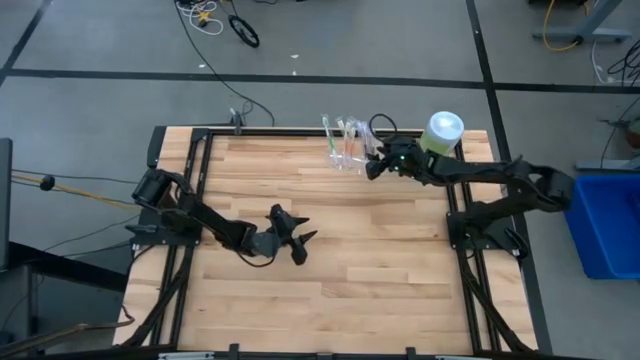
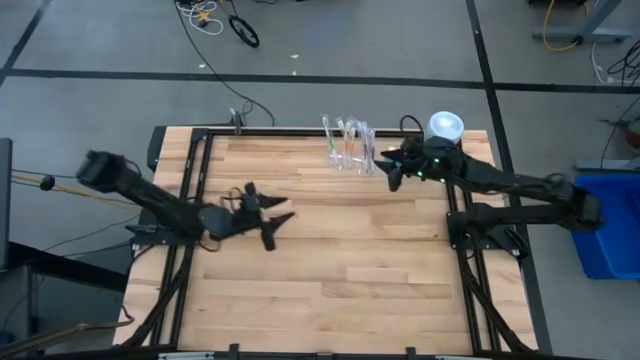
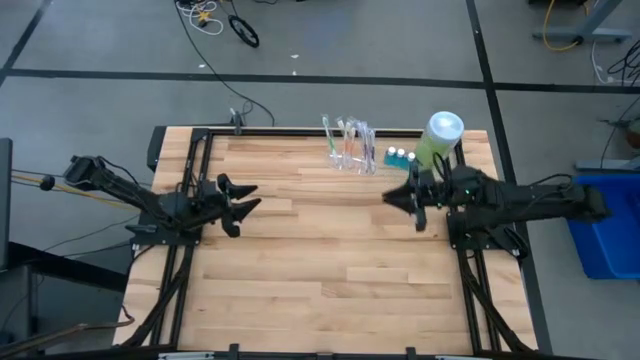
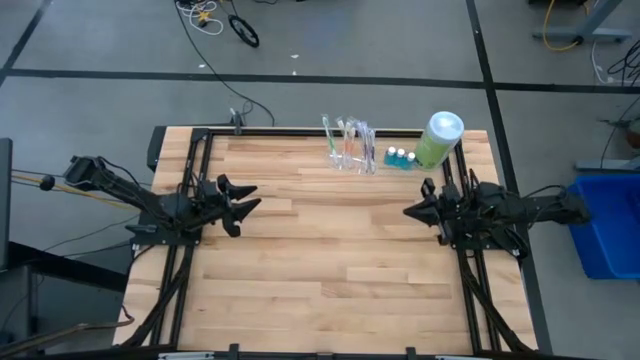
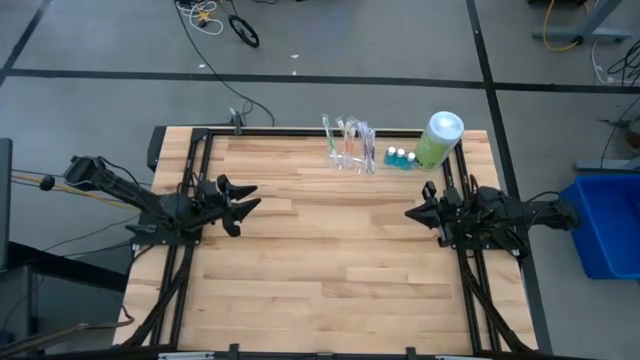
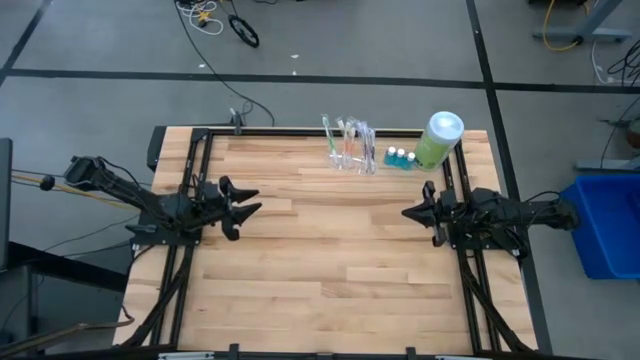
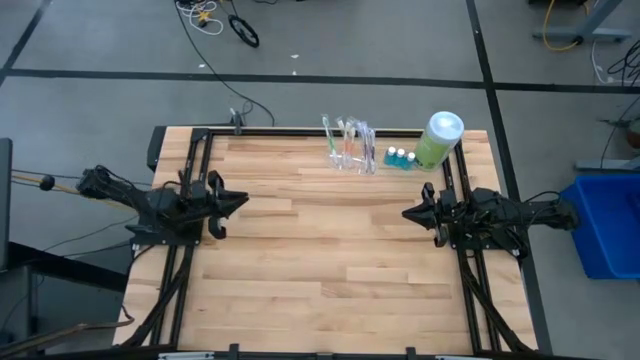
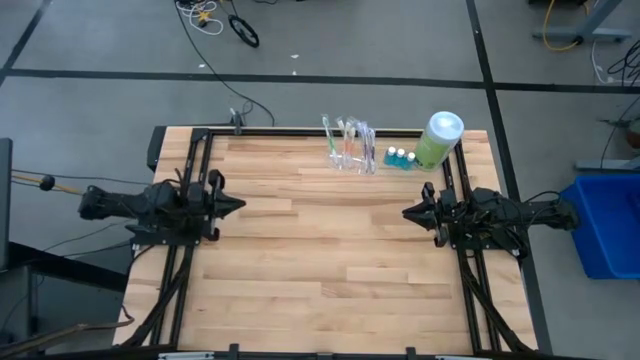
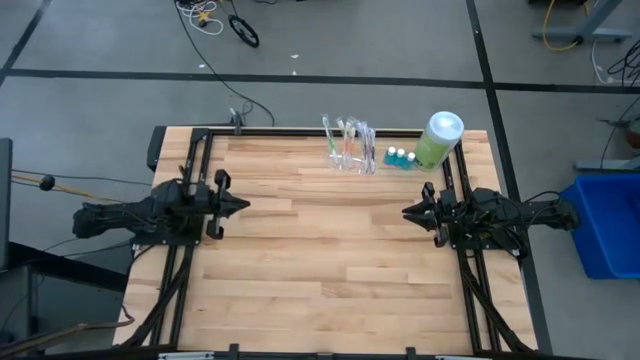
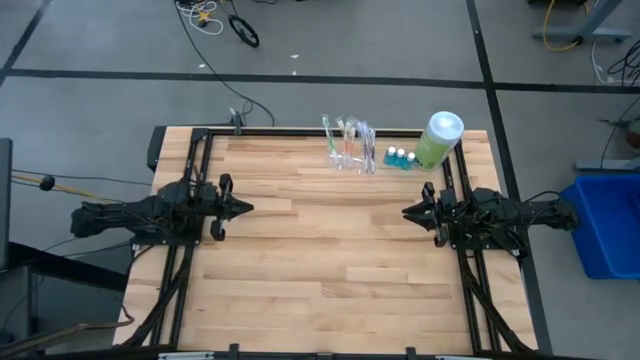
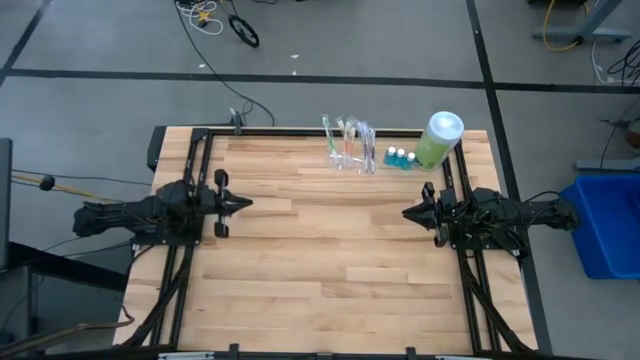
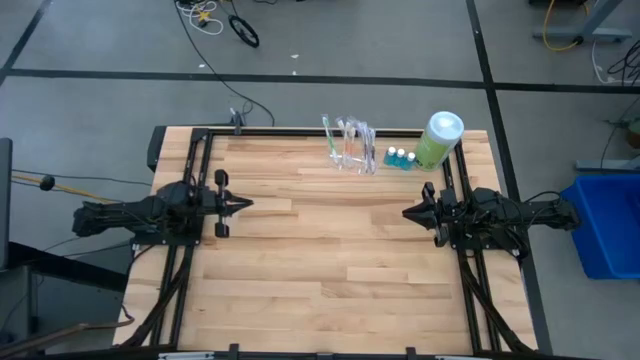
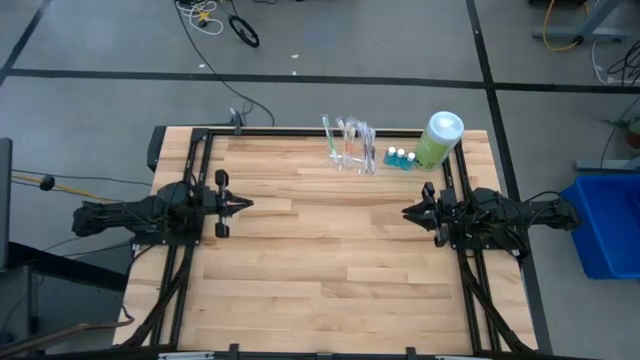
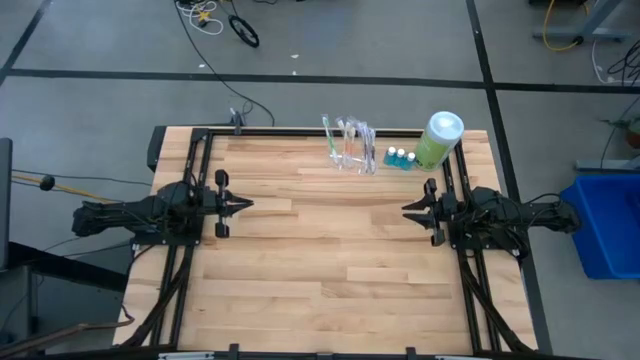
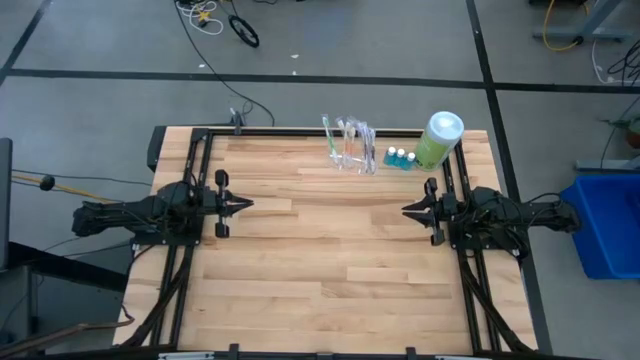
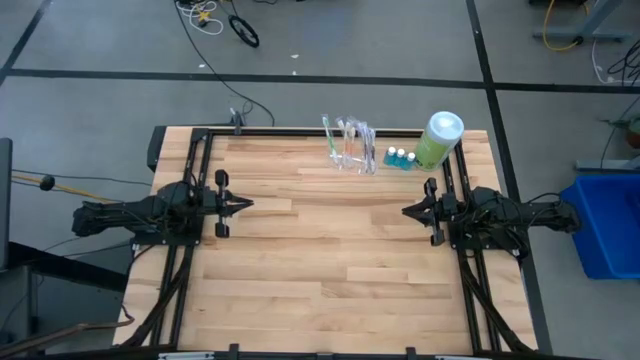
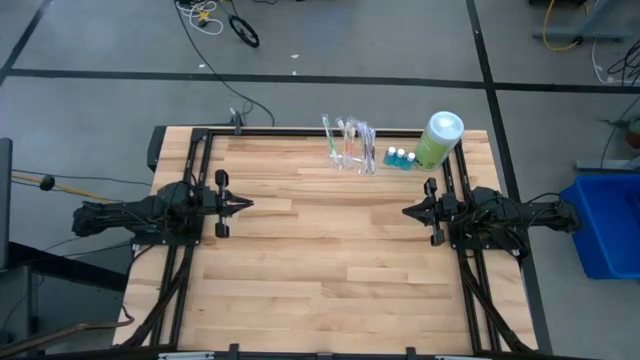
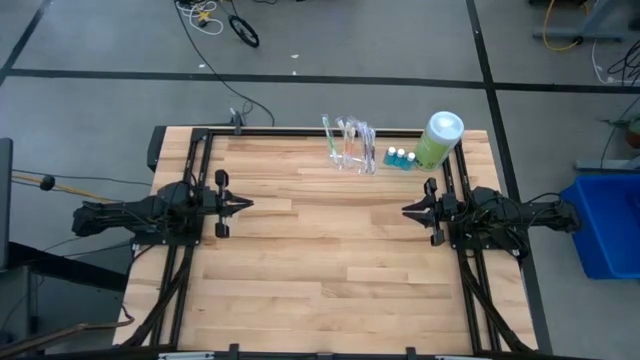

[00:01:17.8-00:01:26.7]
Task: Pick & Place toothbrushing station
Return to home position

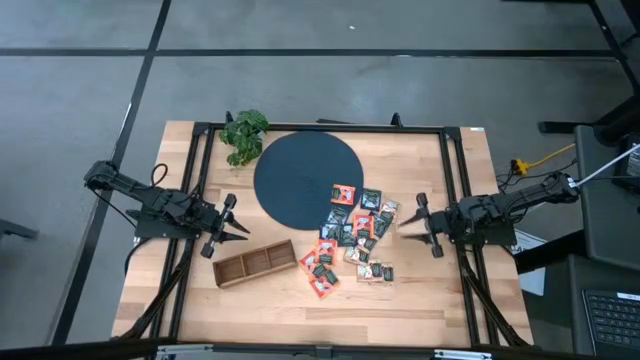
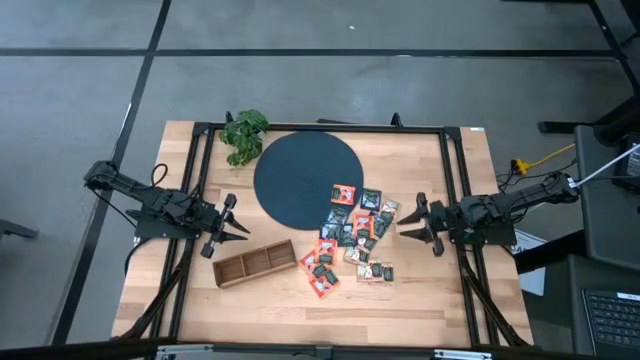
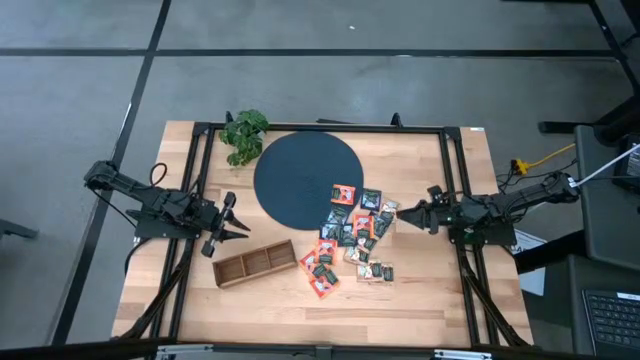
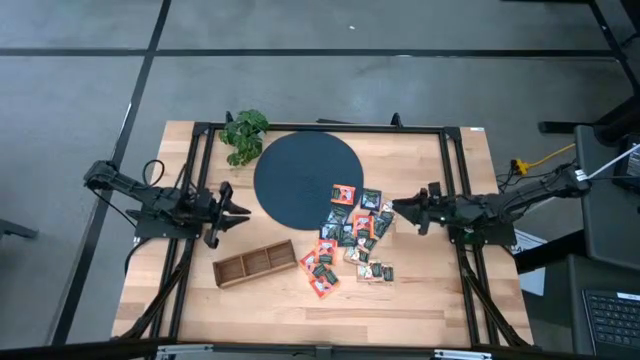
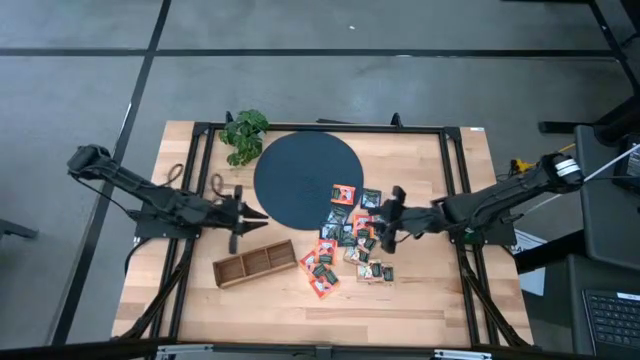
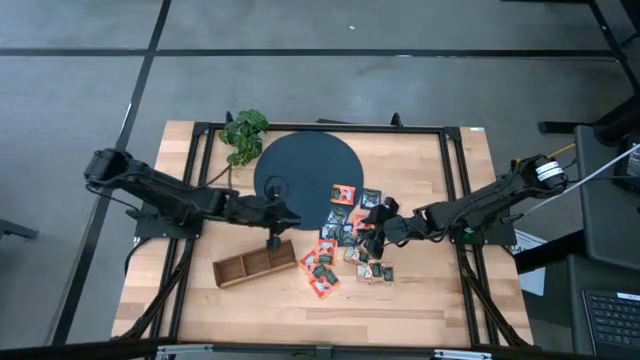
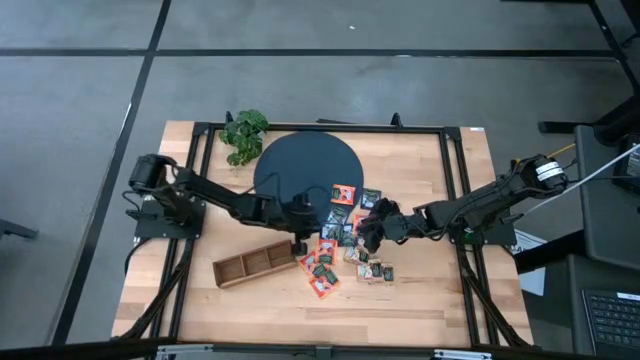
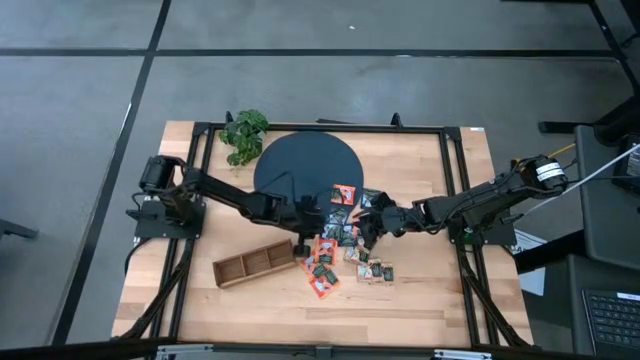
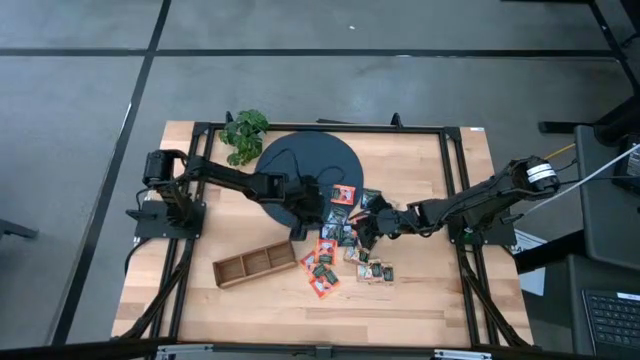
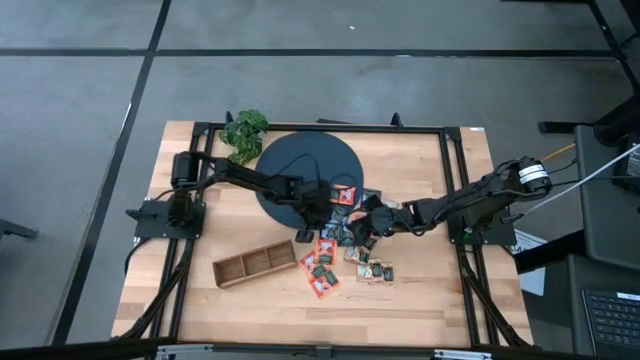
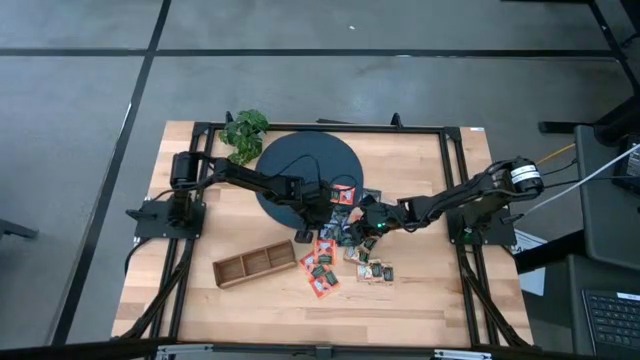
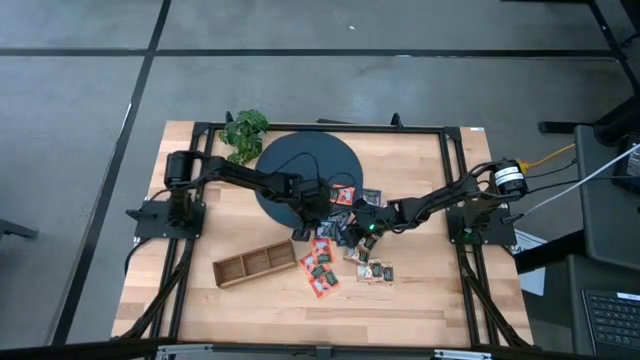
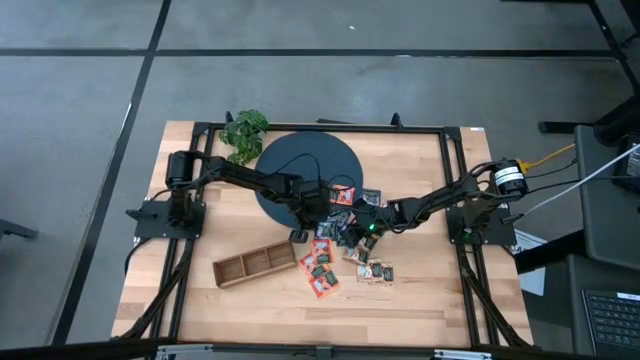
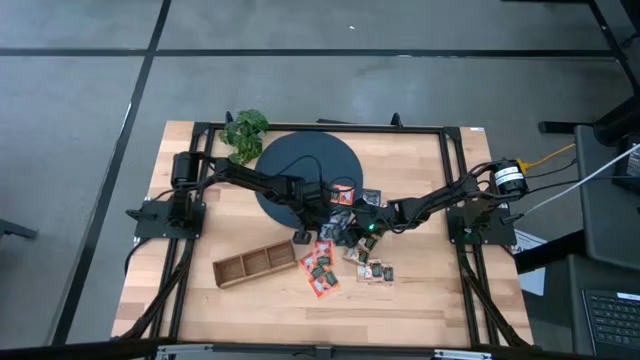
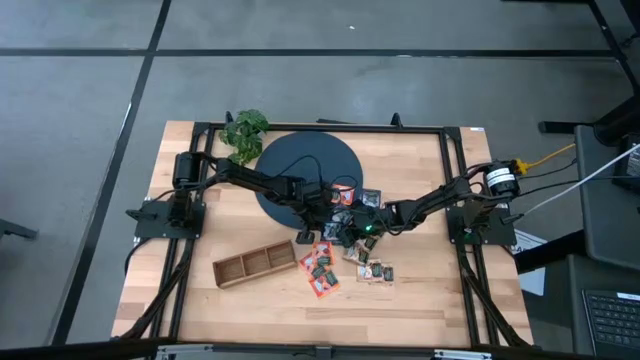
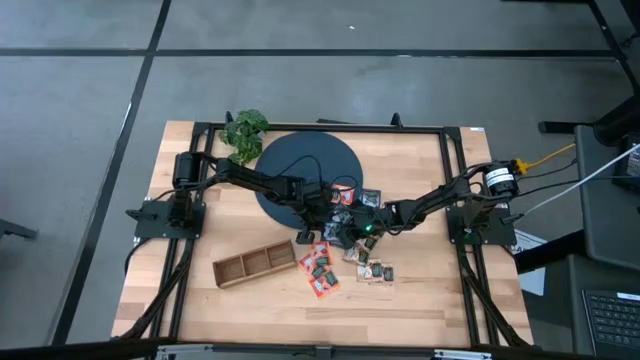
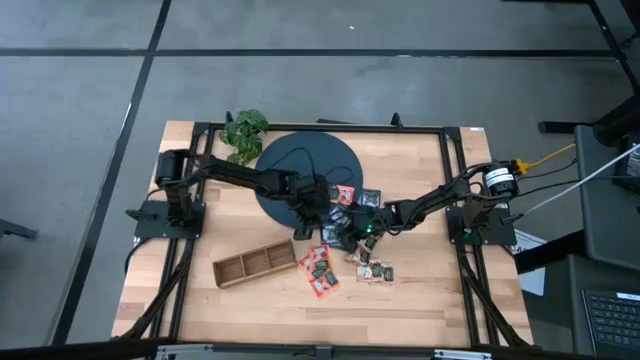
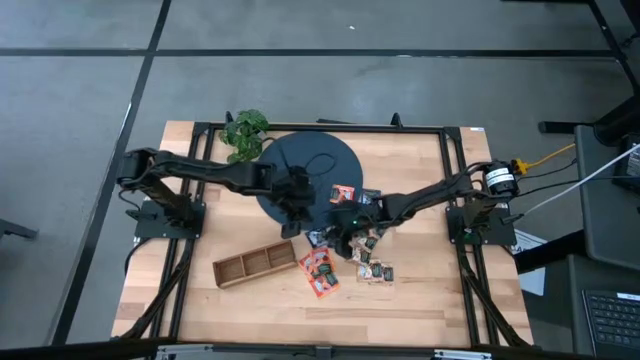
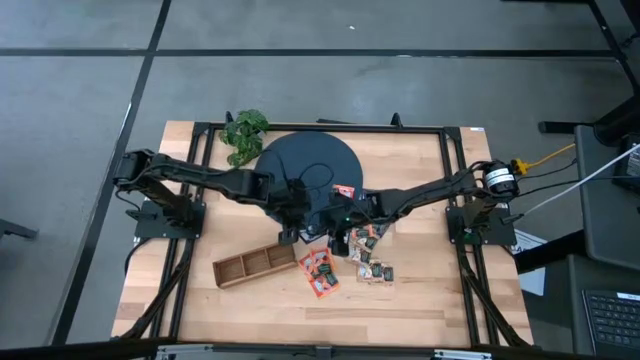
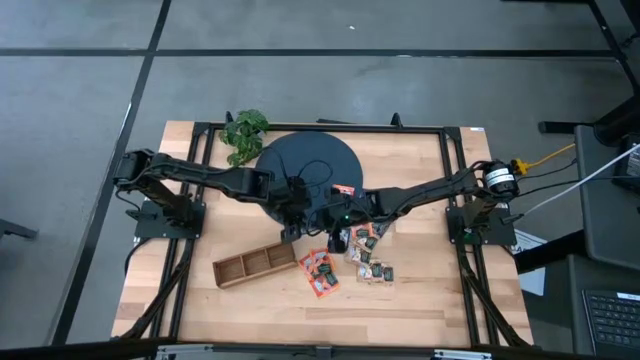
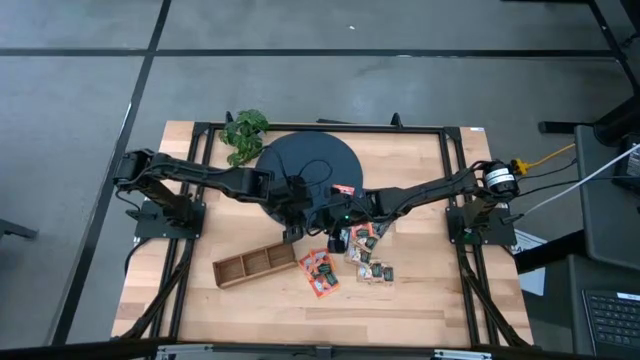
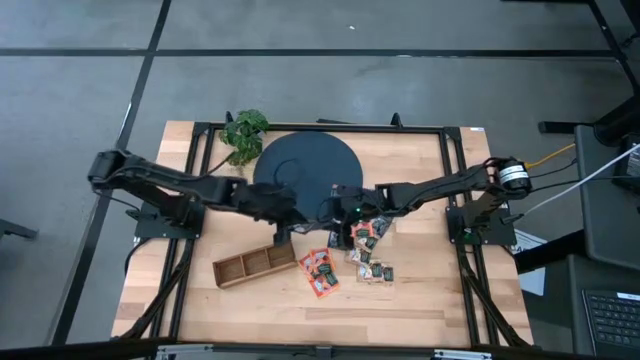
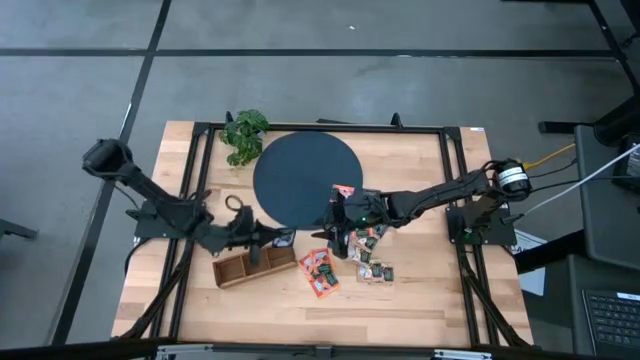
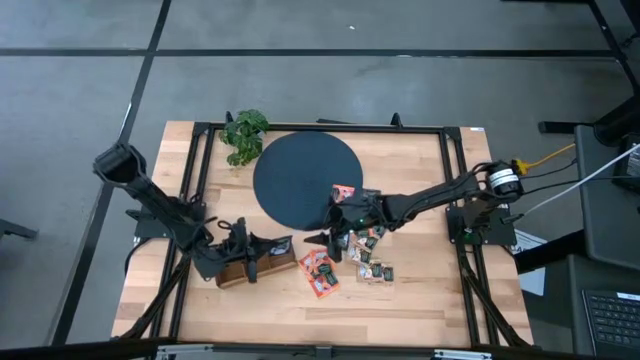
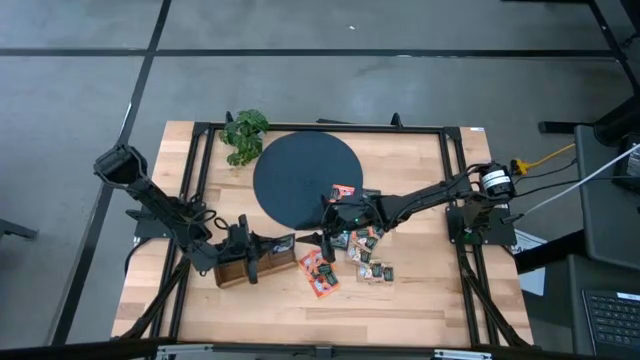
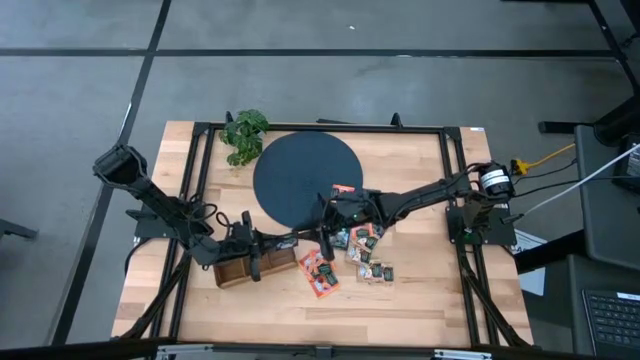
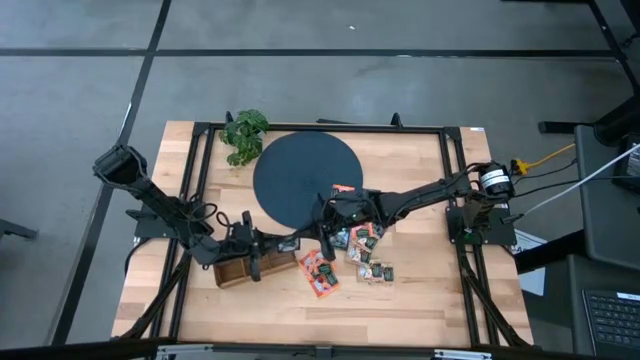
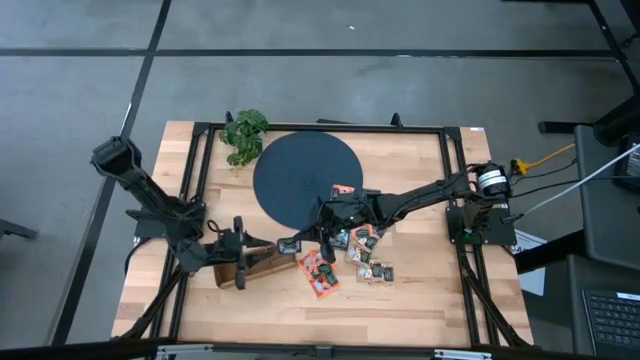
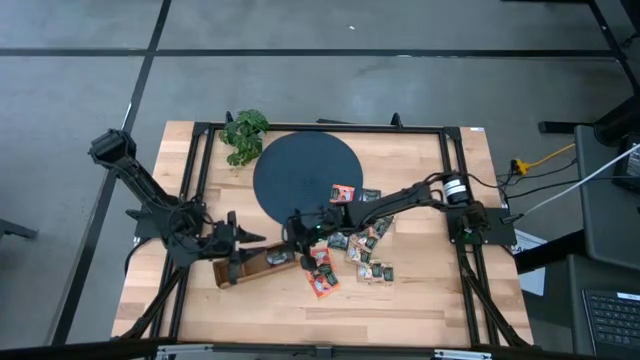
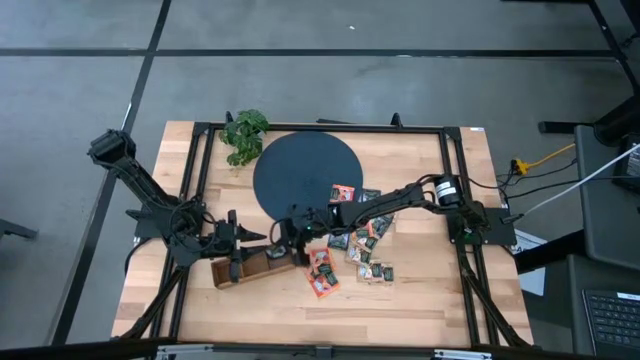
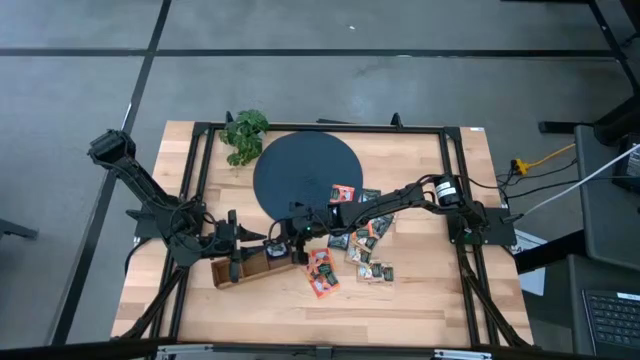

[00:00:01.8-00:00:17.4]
Task: Pick & Place Tea
Put the purple tea bag into the right section of the wooden organizer
